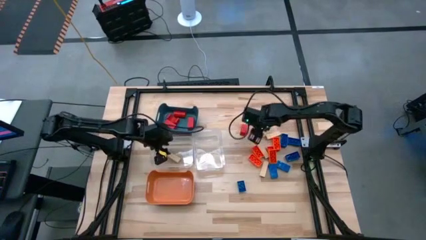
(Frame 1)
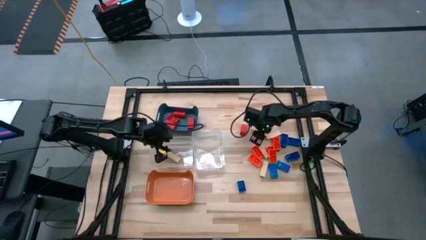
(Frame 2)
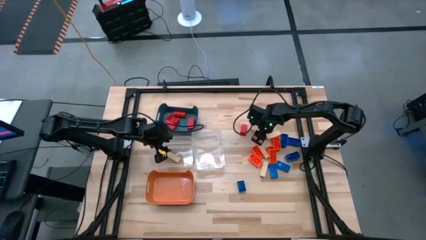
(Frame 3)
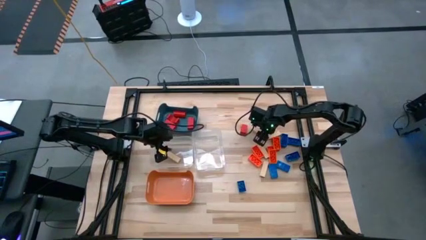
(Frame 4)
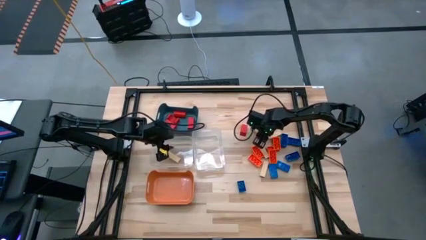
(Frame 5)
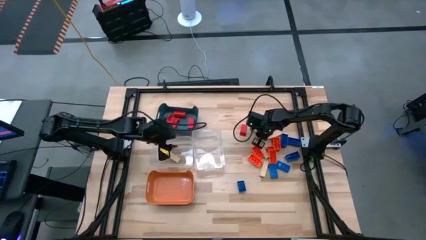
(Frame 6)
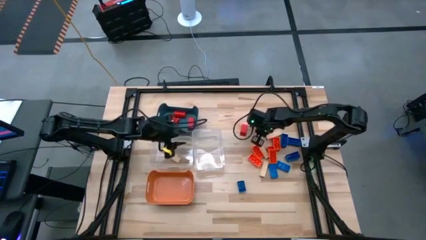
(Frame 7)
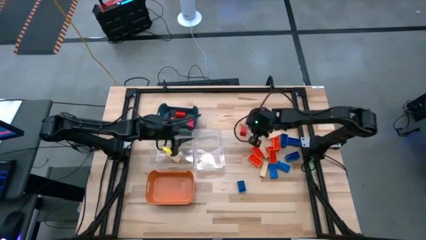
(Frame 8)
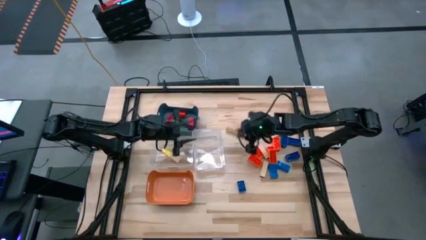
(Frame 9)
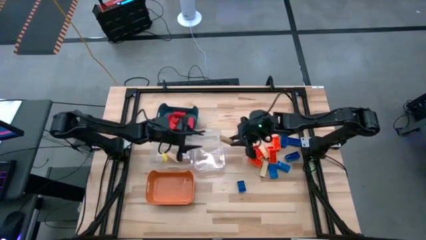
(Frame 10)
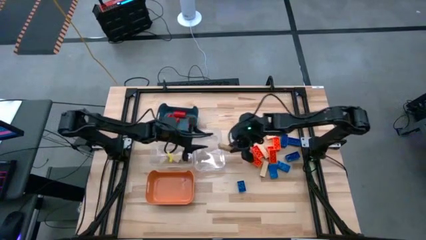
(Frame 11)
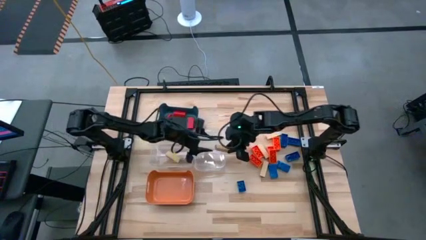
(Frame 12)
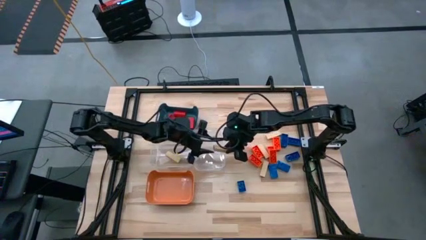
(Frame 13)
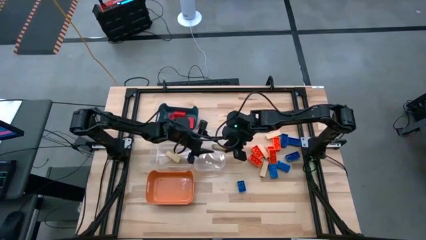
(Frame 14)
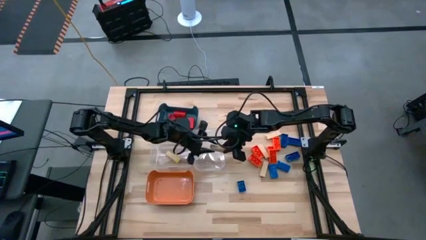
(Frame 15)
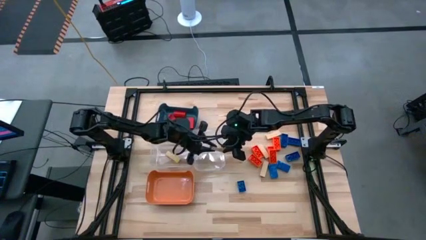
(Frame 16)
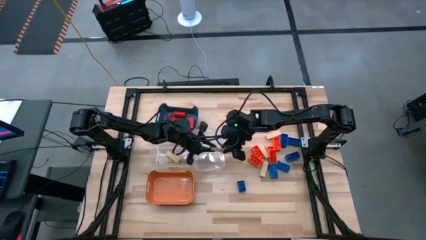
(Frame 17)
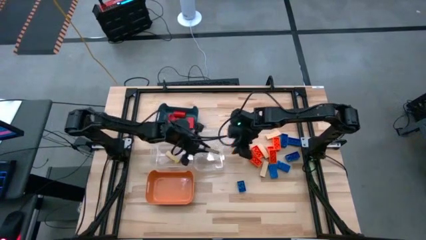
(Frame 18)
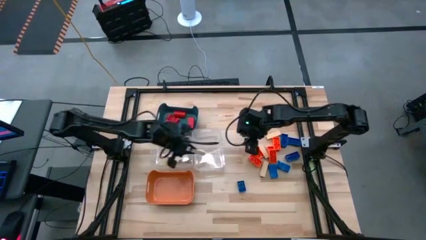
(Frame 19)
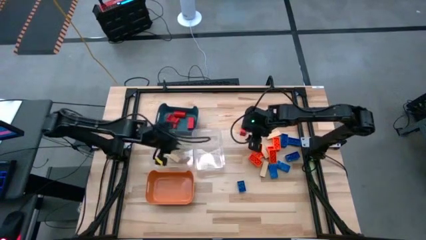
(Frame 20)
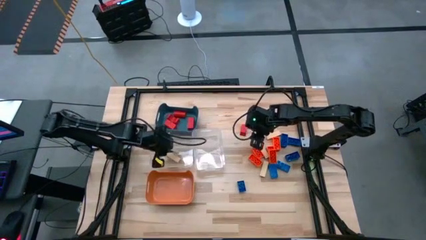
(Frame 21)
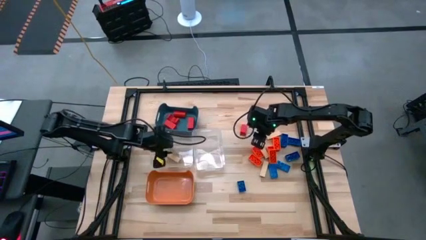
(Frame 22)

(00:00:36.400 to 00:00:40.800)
Task: Sort blocks
Put the brown block into the left transparent bin

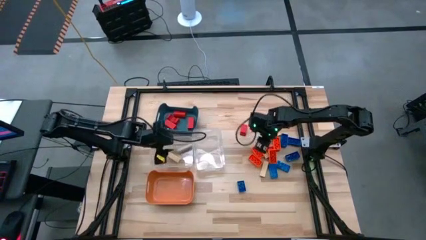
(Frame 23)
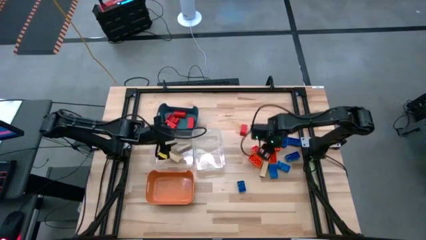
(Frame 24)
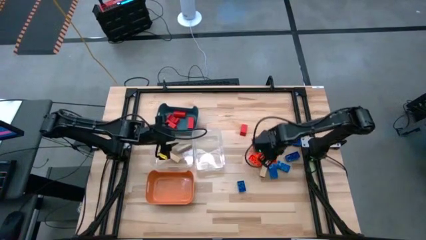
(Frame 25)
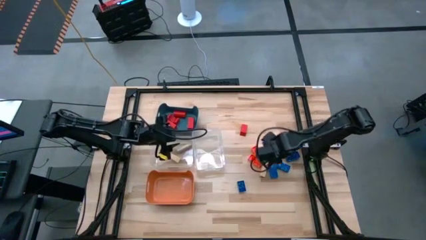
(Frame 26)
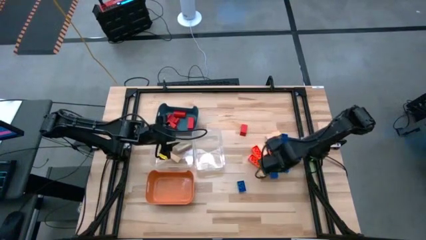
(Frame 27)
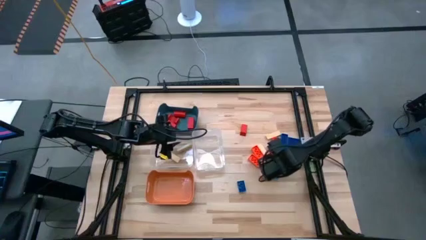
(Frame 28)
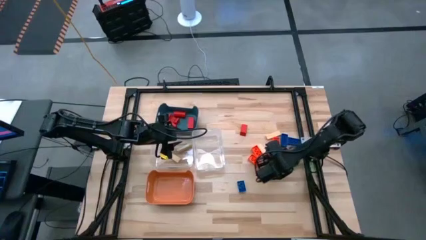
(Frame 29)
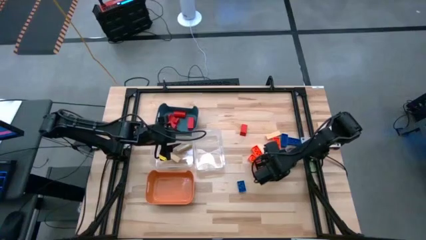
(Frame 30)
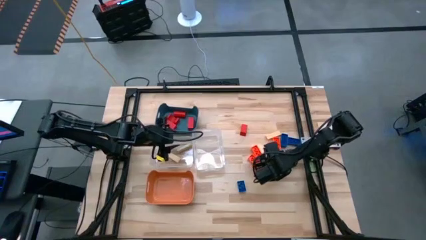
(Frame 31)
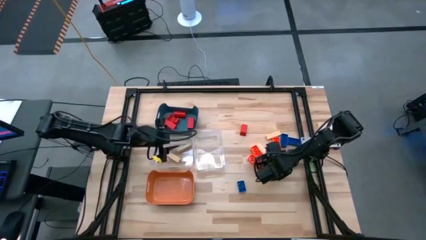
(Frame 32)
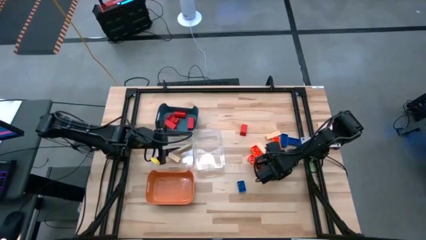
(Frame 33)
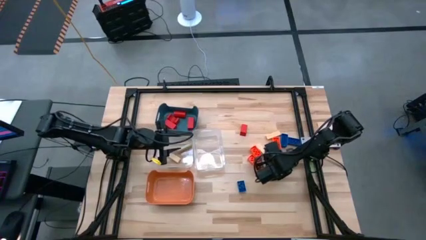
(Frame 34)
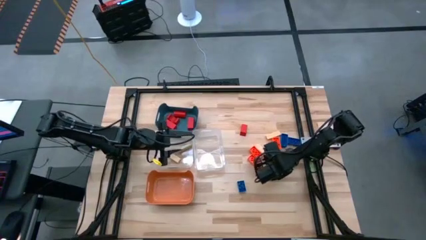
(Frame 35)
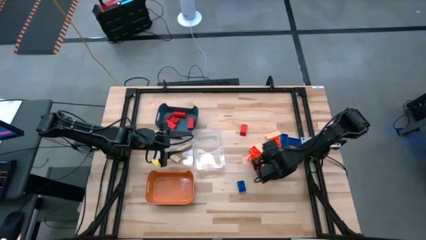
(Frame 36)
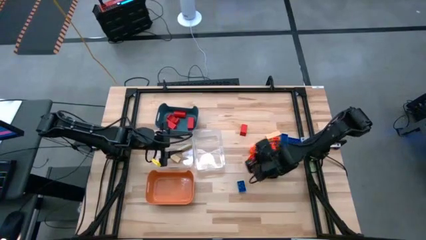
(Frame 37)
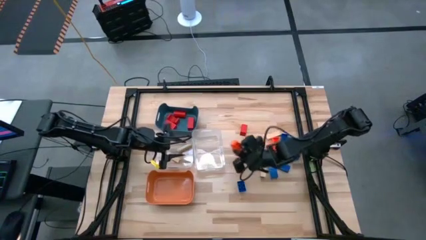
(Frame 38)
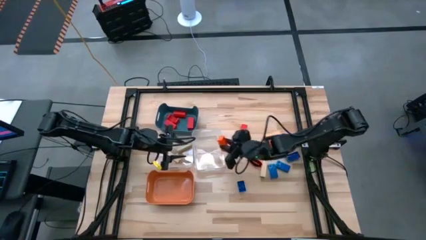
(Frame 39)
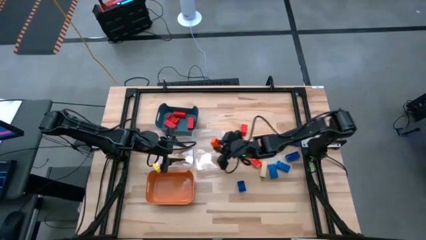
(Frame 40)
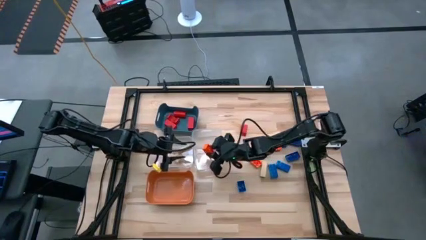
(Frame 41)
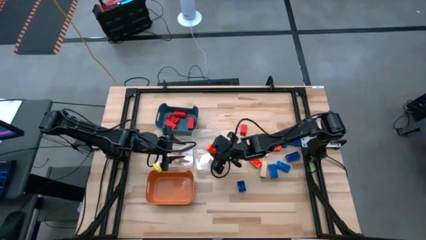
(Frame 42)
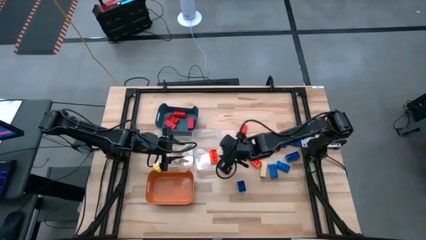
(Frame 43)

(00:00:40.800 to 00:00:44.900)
Put the orange game piece into the right transparent bin

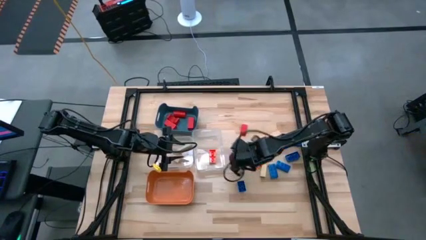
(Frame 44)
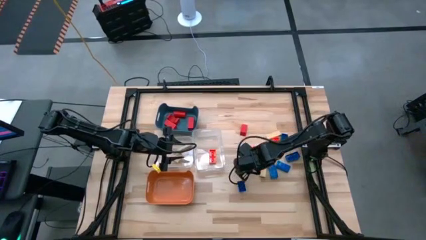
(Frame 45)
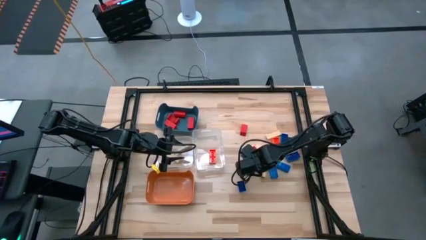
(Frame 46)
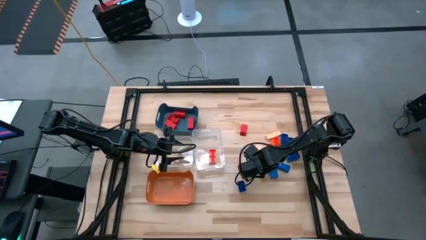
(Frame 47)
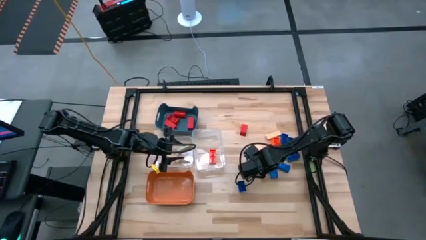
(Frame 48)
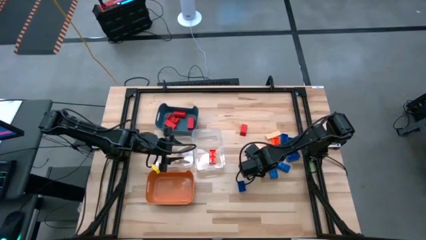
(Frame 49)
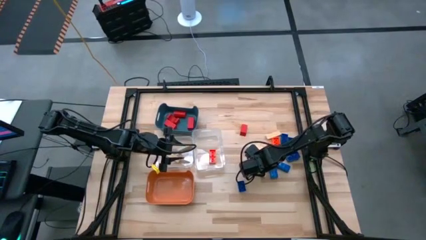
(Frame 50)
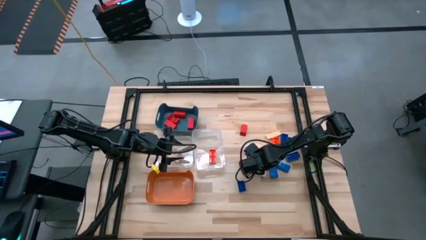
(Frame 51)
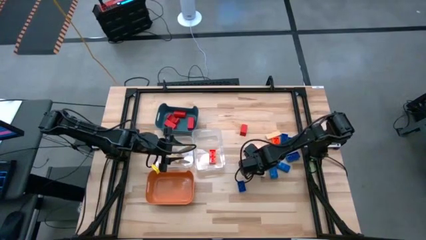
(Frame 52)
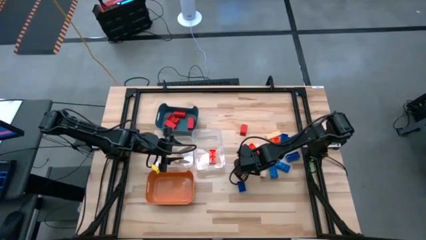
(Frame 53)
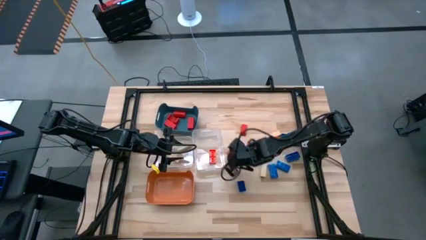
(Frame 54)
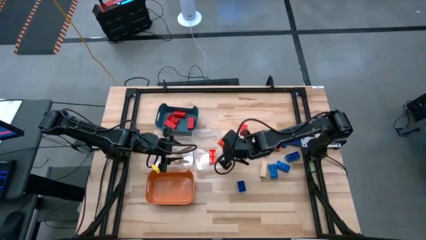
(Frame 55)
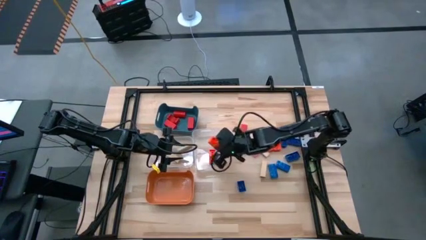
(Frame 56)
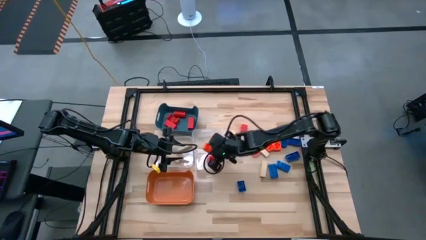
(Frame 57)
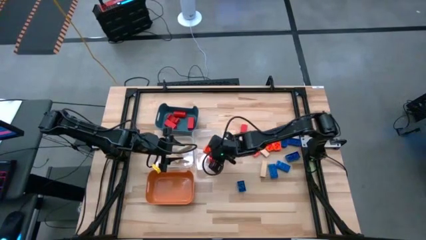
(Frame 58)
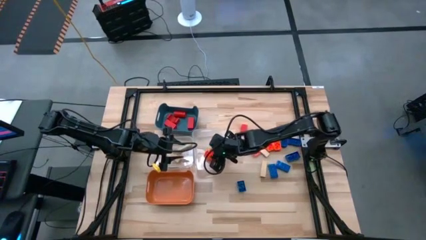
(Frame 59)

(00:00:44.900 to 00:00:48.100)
Put the orange game piece into the right transparent bin

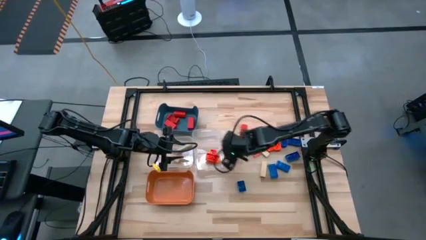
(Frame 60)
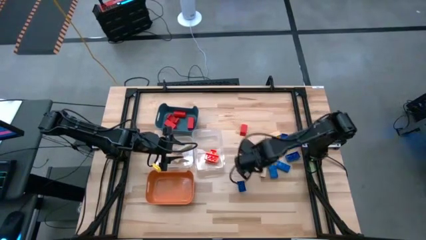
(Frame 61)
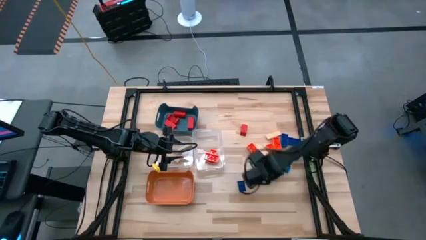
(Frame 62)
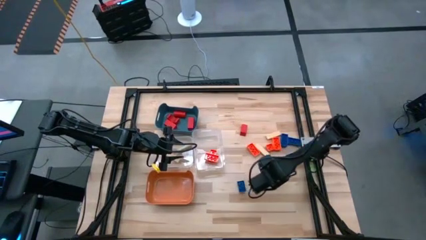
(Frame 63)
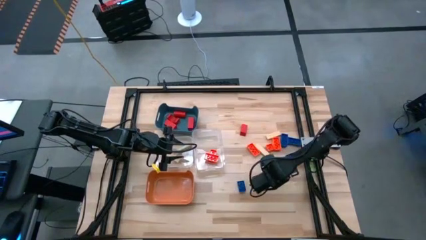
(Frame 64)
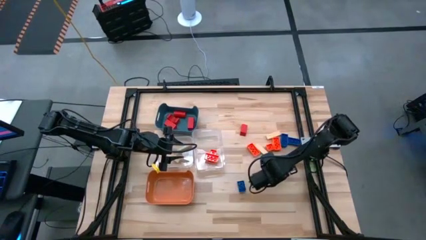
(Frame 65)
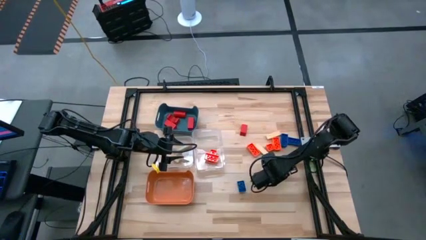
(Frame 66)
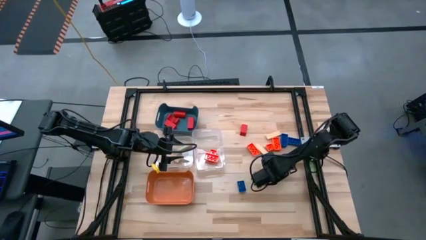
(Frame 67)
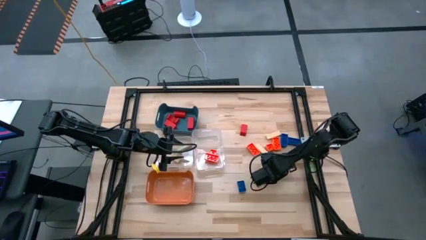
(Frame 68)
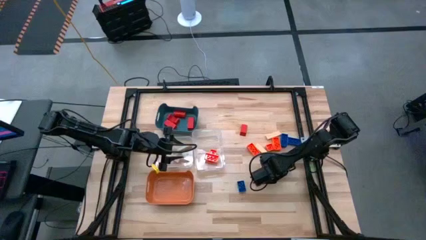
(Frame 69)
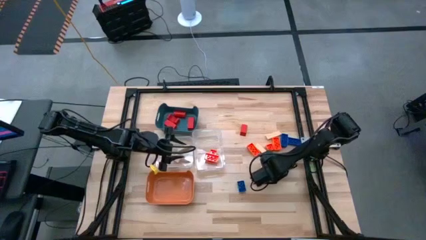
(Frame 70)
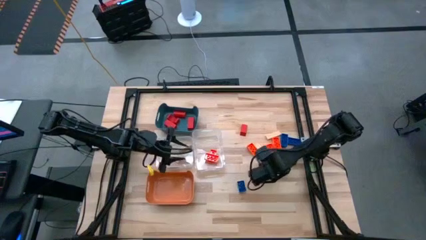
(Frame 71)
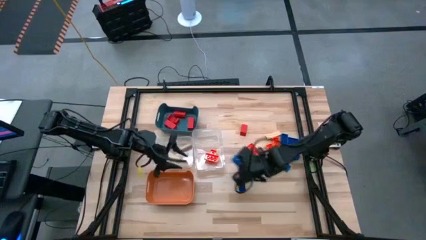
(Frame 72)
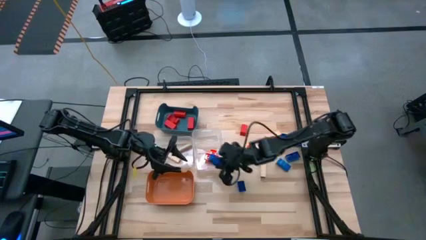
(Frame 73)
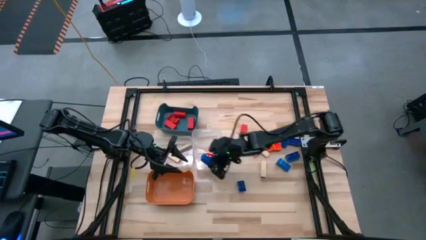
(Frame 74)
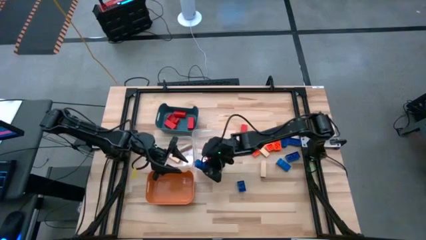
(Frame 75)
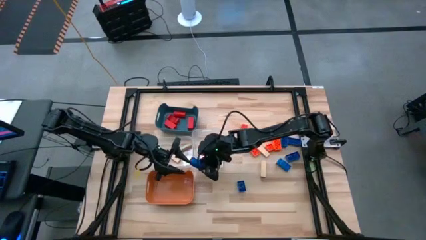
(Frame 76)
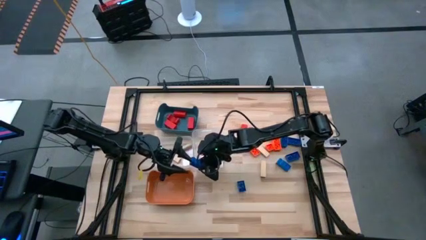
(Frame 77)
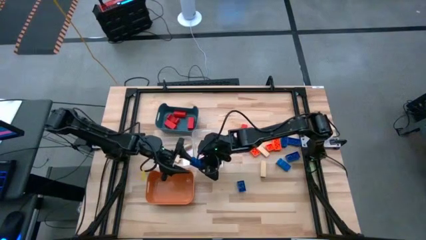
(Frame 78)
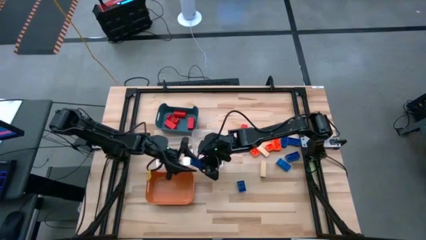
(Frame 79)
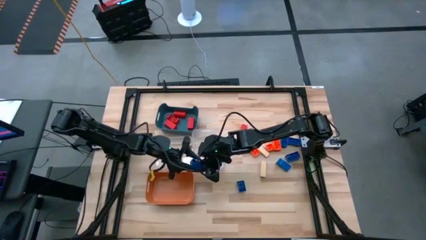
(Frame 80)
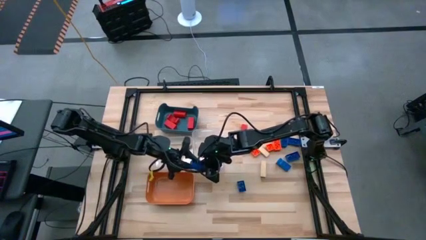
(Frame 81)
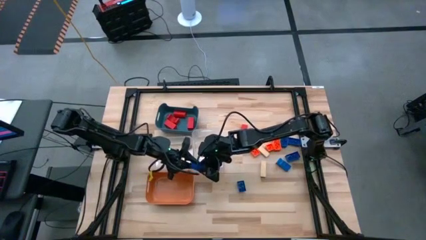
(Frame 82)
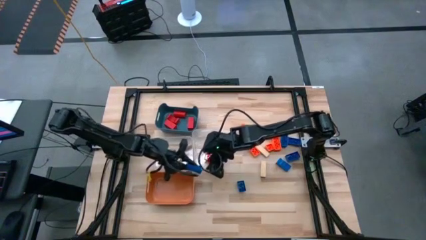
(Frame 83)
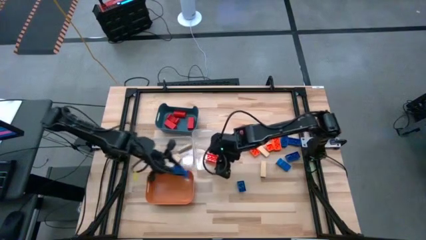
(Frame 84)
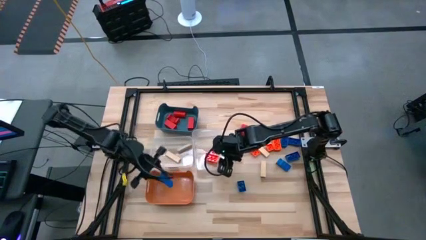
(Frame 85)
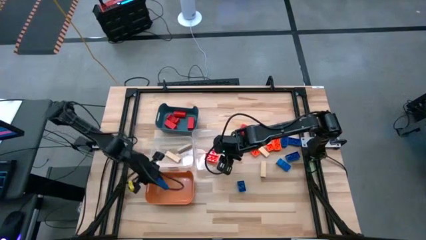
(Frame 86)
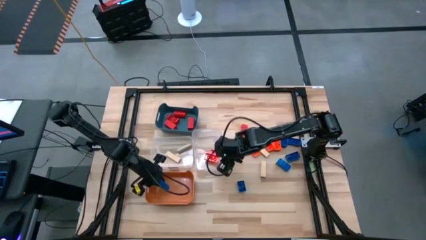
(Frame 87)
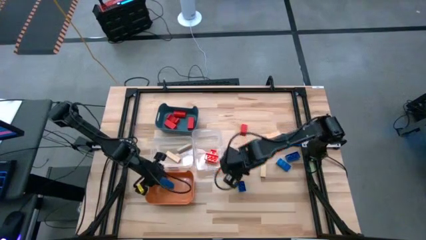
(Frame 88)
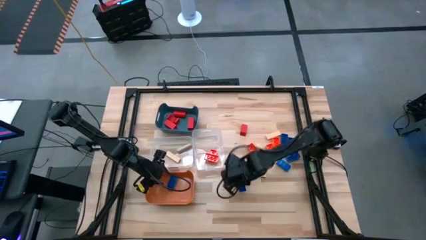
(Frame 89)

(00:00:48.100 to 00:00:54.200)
Put the blue game piece into the orange bin
